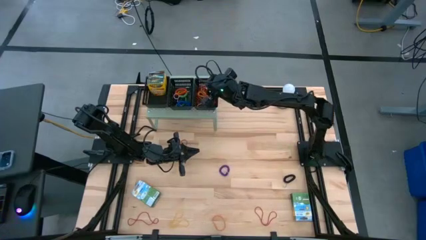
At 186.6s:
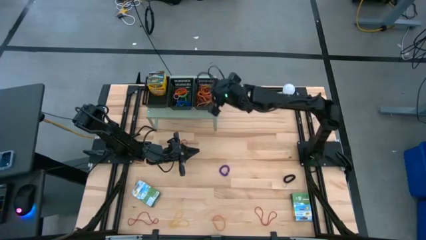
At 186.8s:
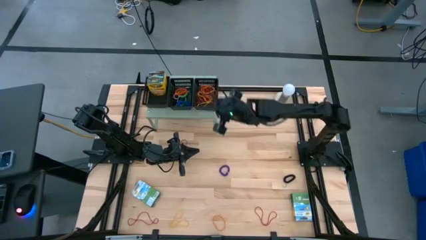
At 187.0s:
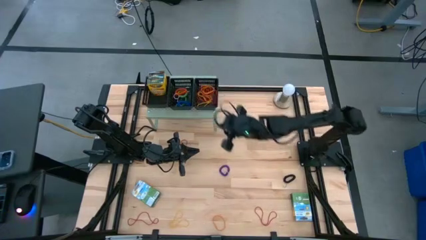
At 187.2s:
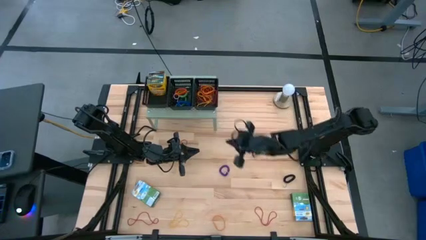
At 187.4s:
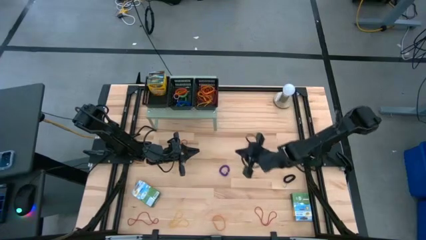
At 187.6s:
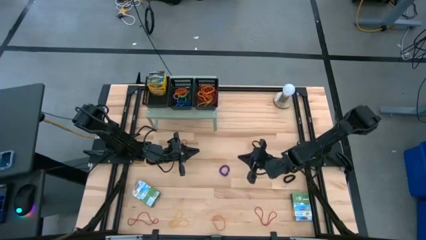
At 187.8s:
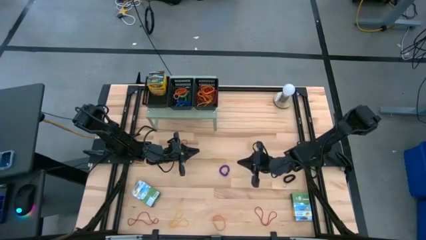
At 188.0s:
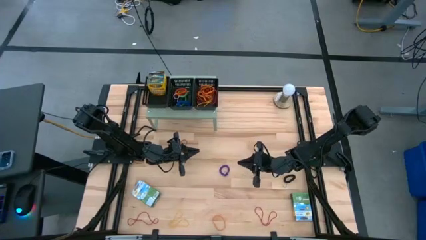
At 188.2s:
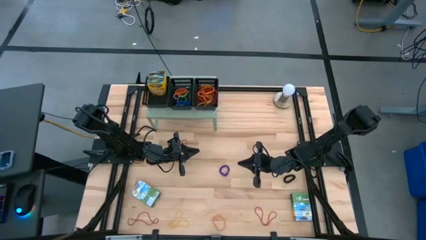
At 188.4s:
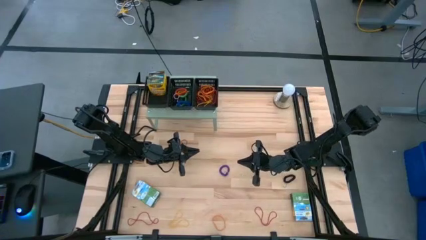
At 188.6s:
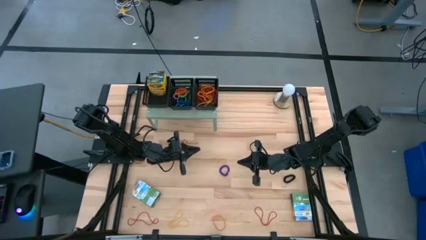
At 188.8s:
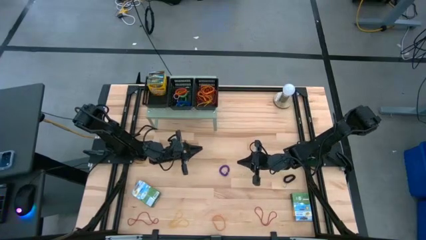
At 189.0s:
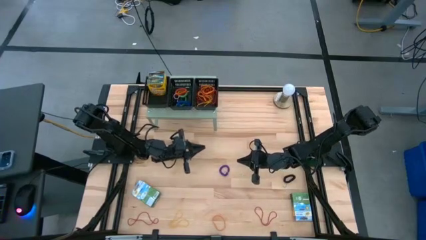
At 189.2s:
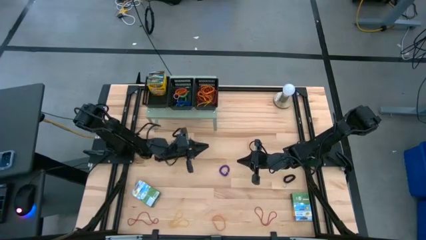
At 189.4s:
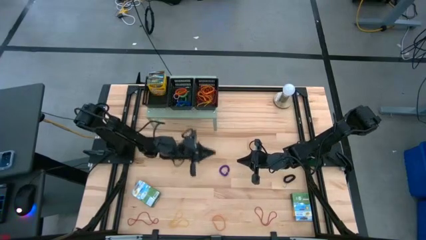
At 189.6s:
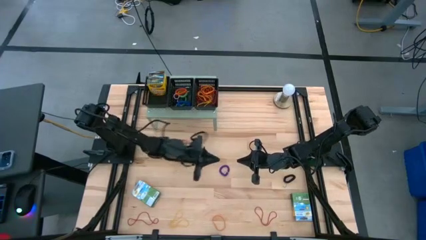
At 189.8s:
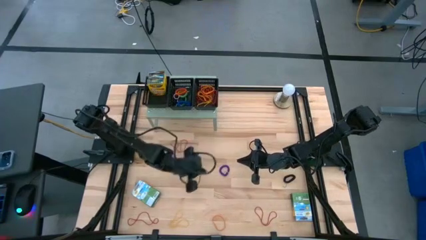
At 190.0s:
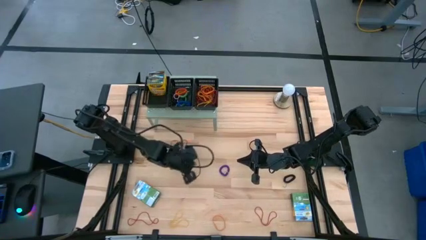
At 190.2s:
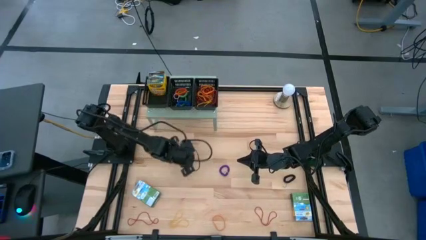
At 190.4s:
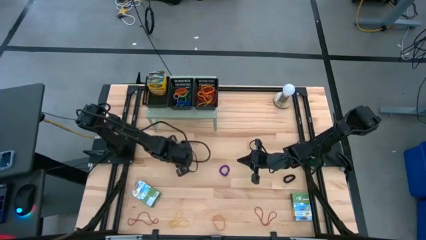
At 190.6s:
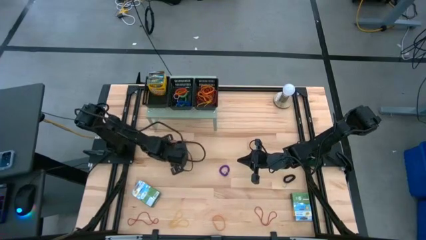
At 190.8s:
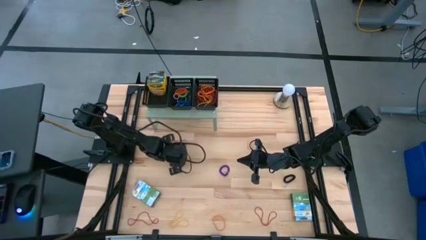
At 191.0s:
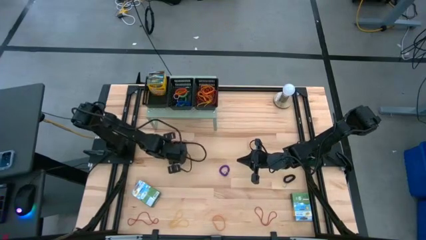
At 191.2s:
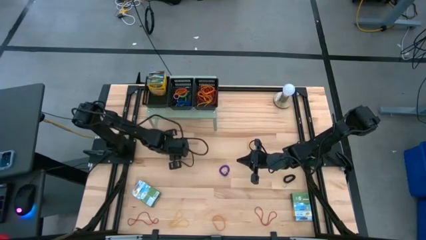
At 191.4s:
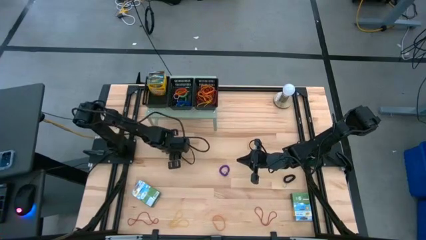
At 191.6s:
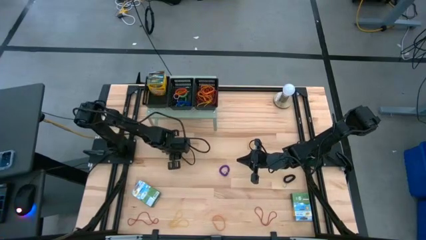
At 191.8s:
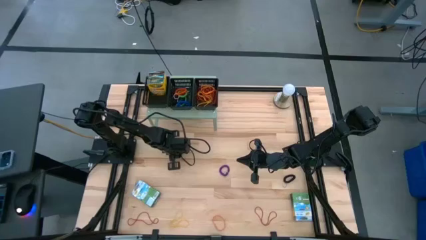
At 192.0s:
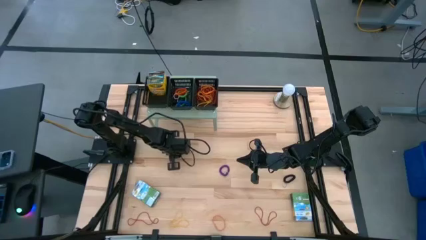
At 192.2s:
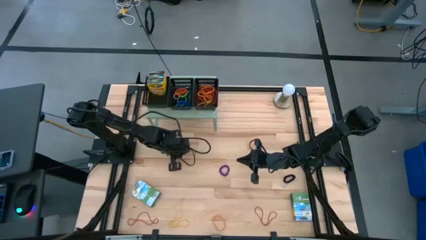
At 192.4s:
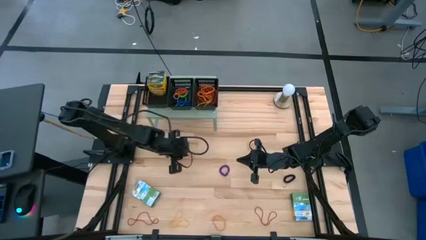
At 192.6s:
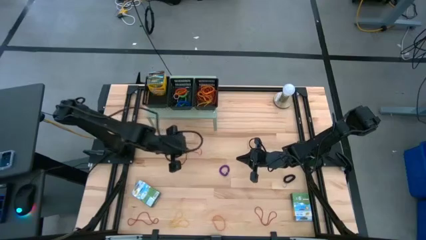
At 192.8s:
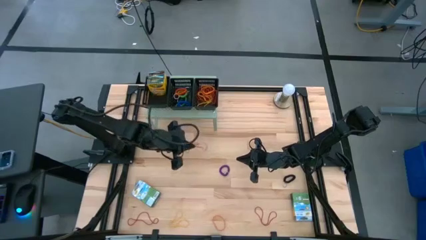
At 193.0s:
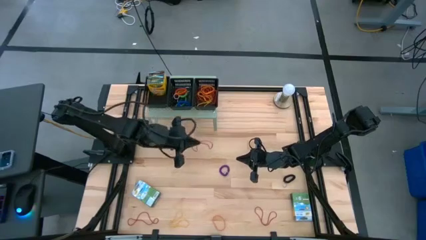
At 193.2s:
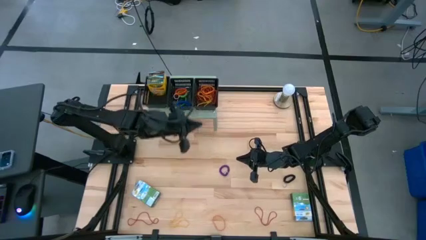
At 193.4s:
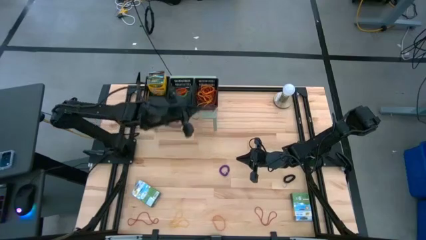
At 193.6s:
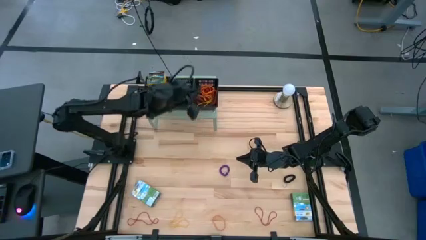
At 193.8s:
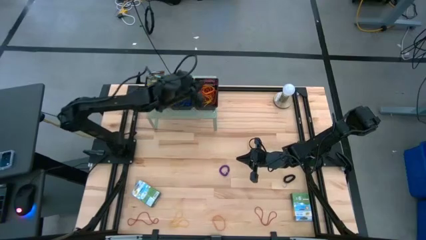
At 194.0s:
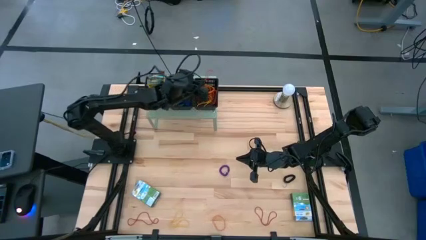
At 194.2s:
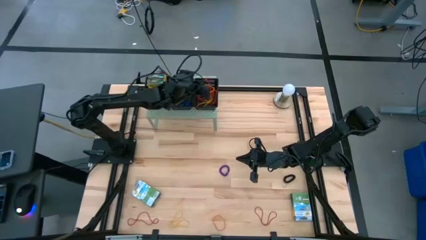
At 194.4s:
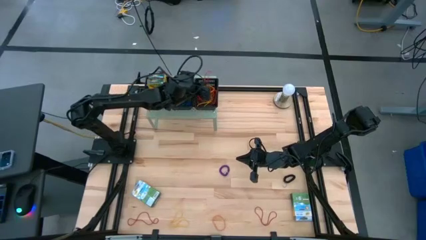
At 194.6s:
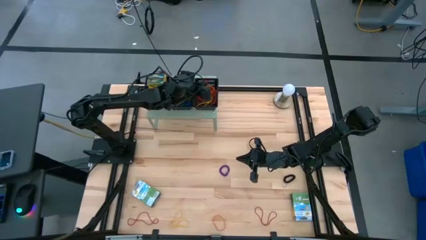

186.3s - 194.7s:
Task: Pick & Place Office Desk Supplies
Put the red rubber band into the right black bin on the shelf

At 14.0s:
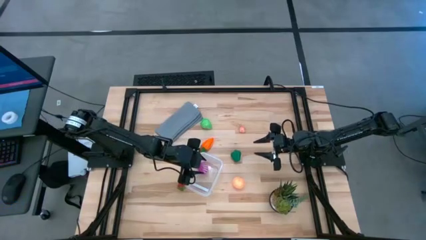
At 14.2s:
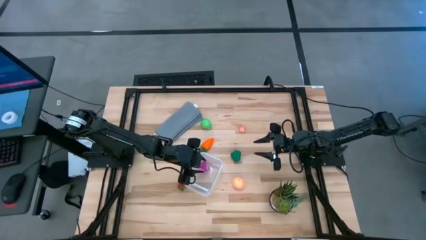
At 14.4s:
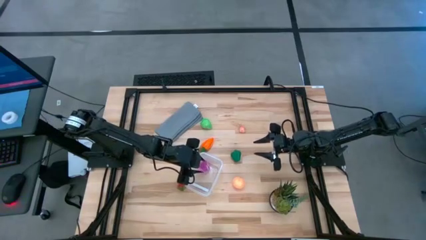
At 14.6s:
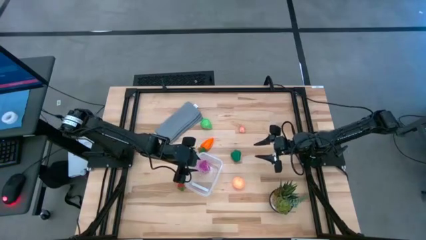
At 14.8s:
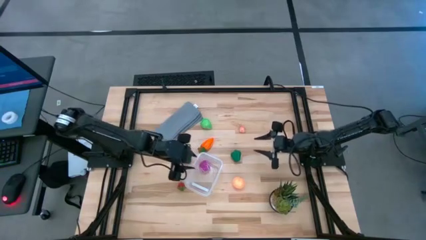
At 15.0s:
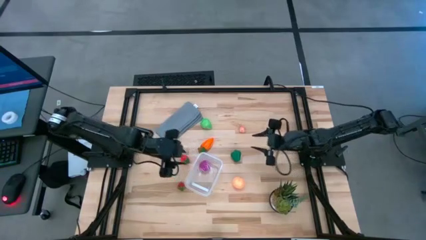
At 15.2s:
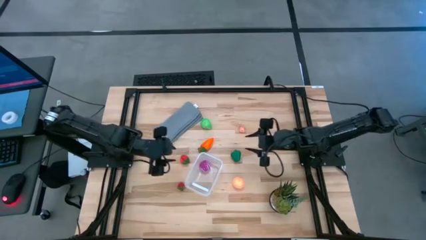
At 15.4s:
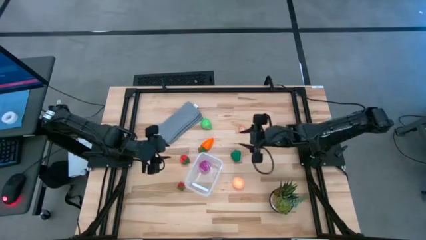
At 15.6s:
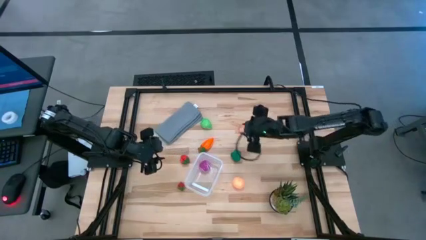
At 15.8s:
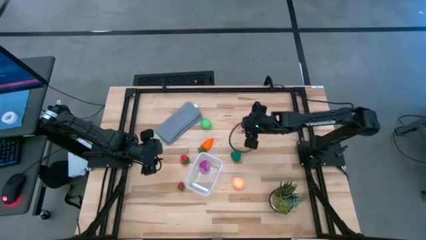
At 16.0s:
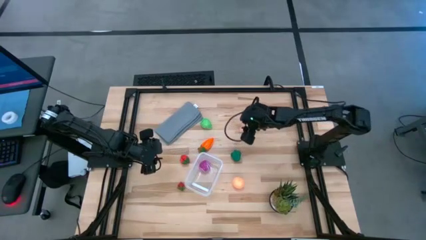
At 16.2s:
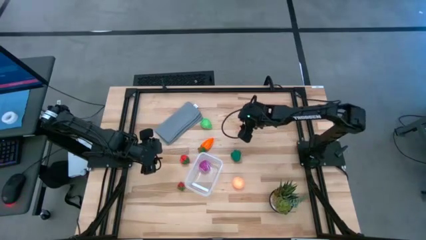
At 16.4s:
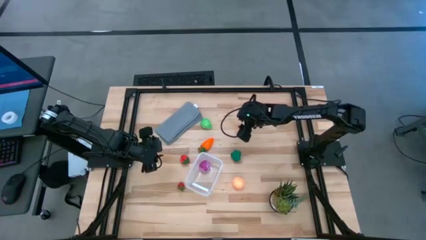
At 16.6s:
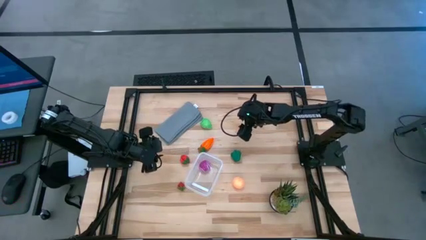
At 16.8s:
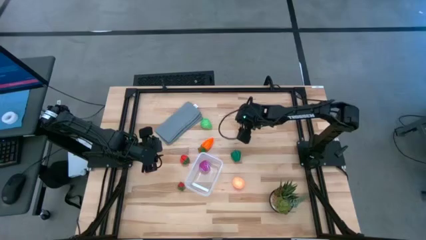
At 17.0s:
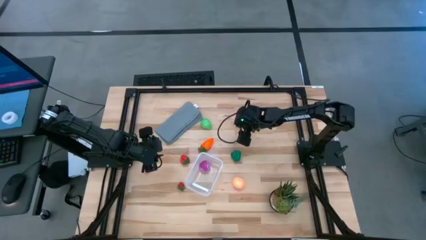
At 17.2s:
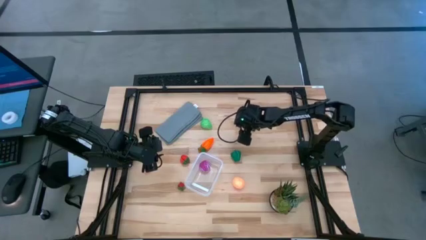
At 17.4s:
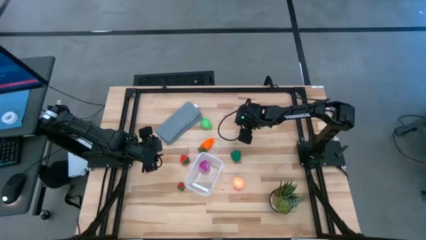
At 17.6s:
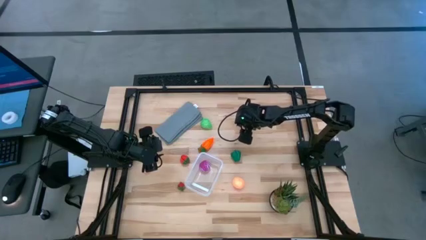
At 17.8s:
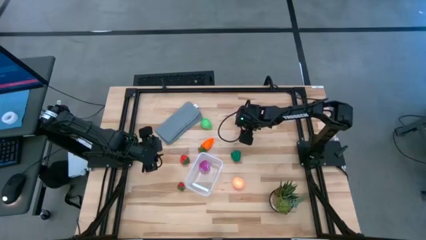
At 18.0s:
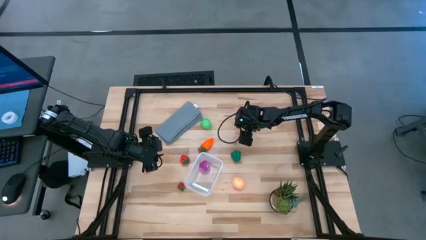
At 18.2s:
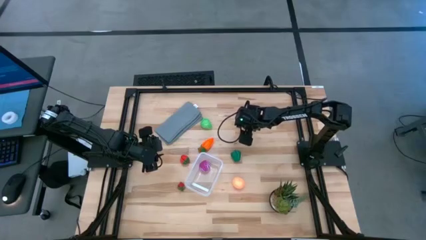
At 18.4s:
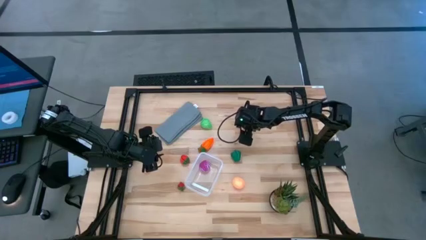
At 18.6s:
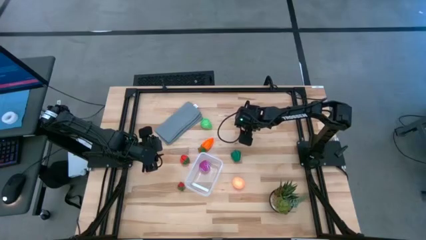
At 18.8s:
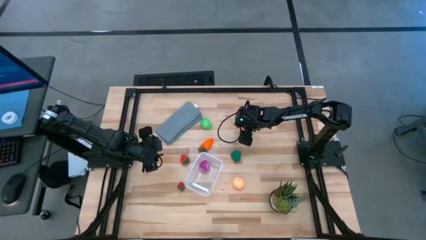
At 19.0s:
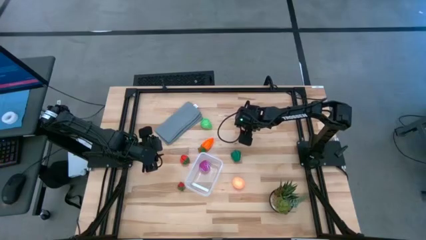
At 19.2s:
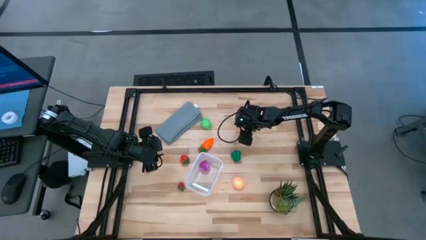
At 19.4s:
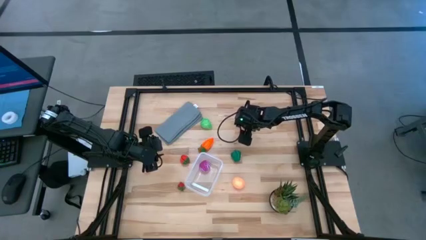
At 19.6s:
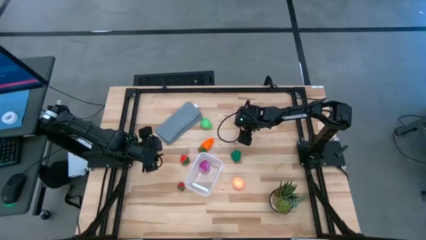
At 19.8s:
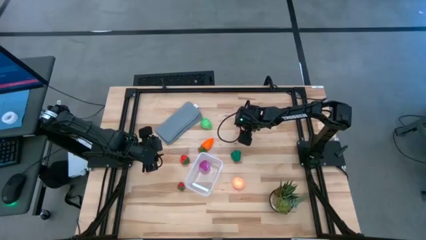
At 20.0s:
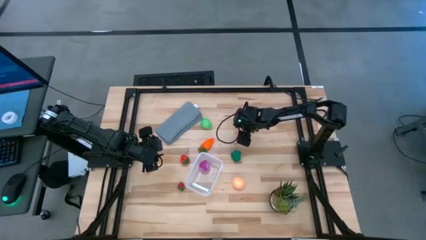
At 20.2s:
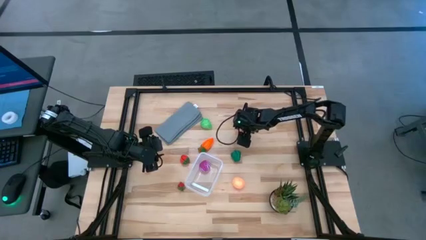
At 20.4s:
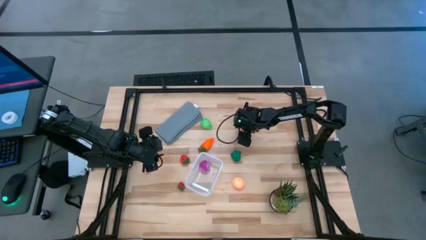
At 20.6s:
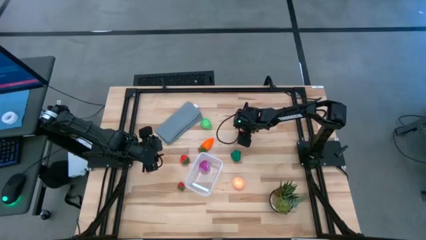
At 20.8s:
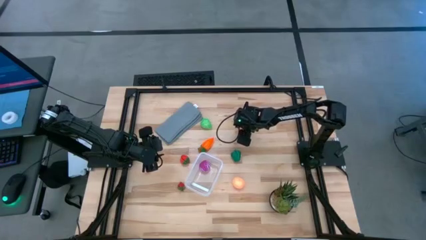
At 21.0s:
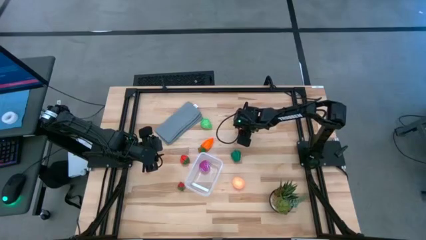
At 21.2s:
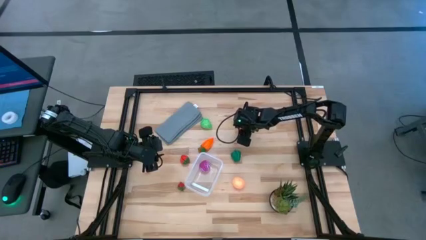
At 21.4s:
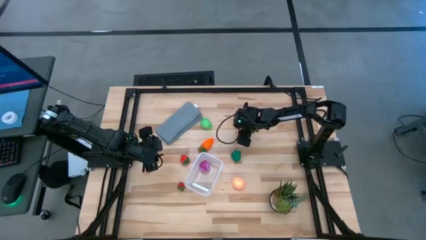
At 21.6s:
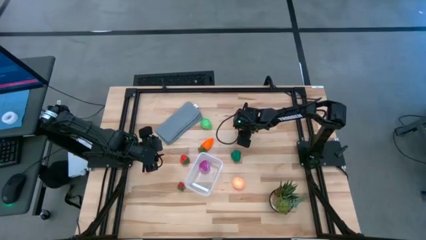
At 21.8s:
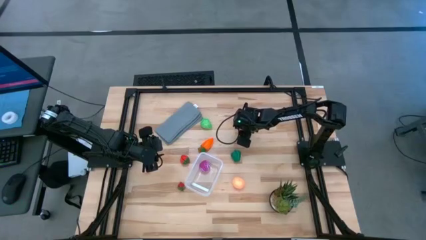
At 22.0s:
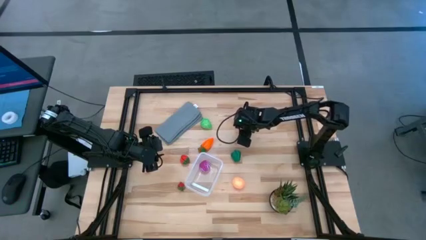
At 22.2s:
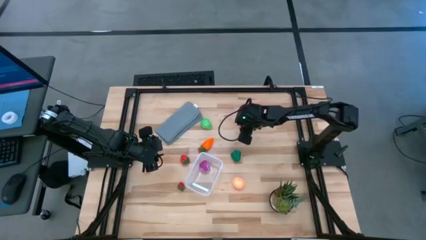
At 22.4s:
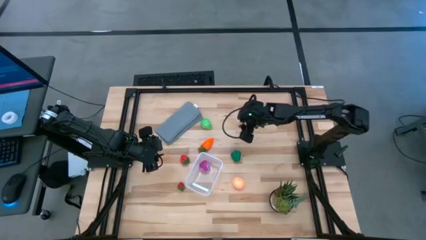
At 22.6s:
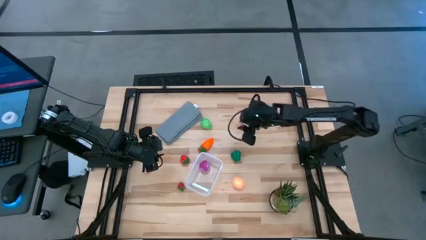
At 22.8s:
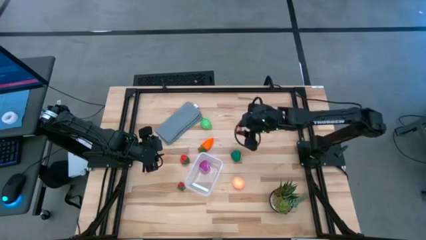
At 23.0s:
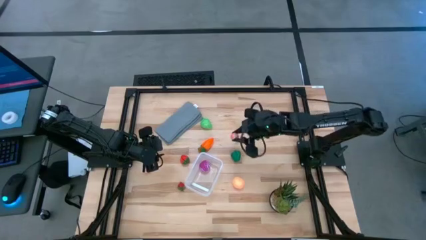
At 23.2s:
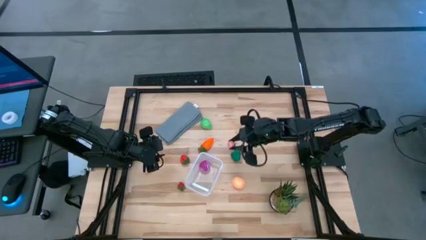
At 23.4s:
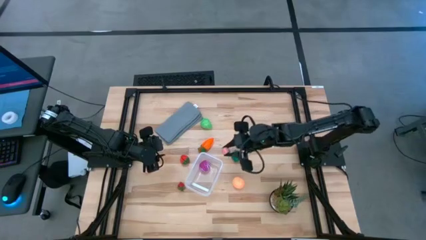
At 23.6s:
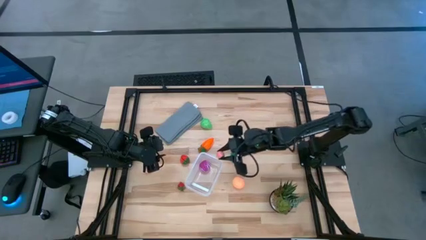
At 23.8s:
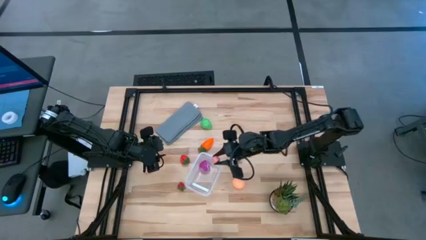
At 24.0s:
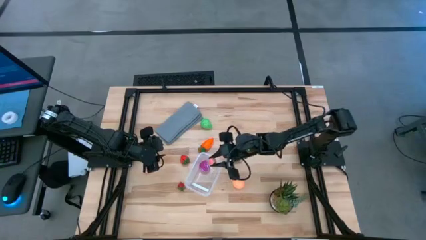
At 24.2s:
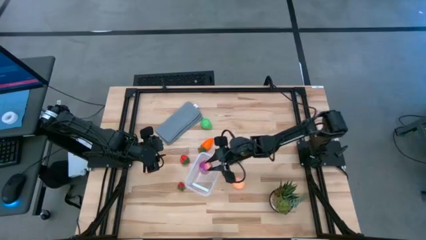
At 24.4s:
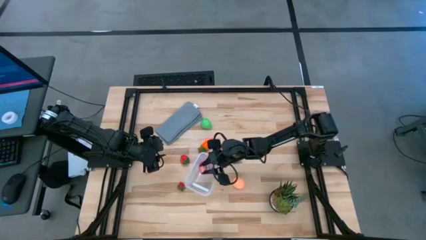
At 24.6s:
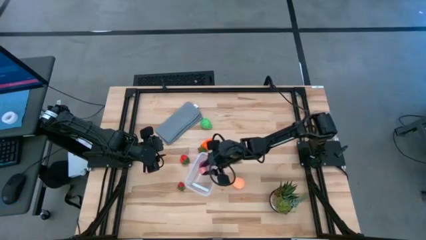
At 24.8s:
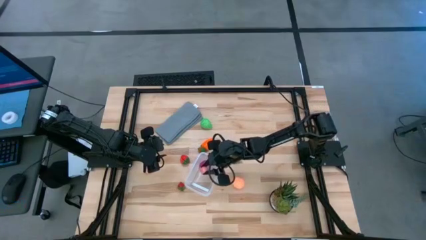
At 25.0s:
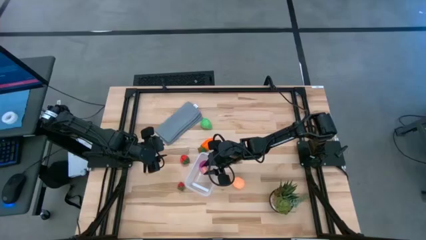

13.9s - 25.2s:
Task: Pick and placing Produce into tupperware
Put the pink peach into the transparent bin
